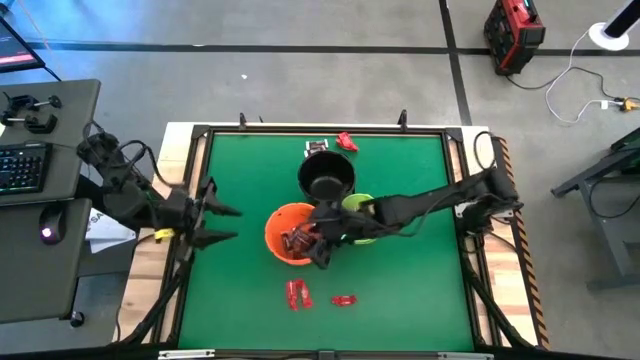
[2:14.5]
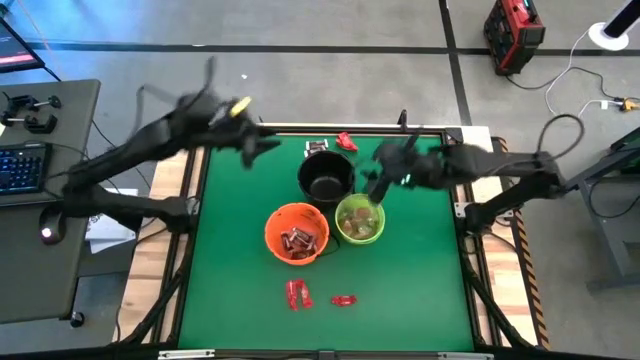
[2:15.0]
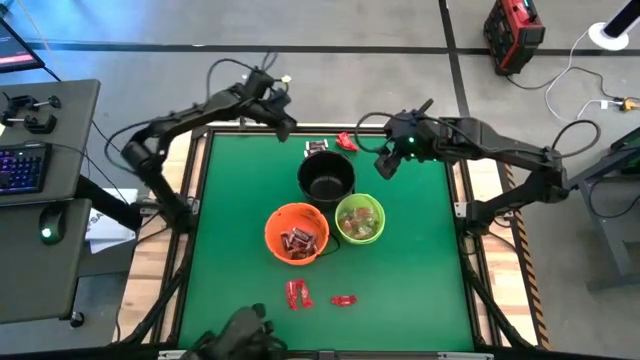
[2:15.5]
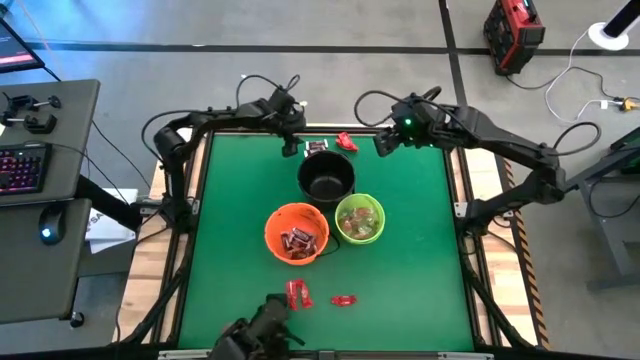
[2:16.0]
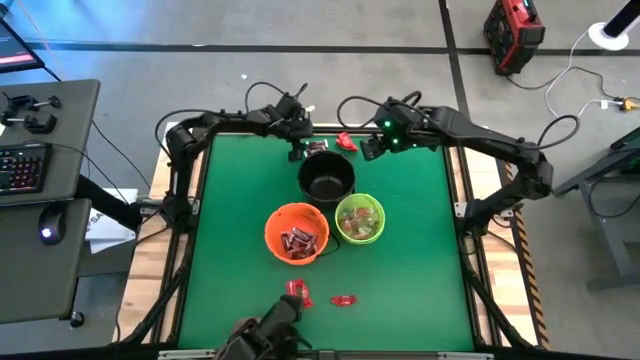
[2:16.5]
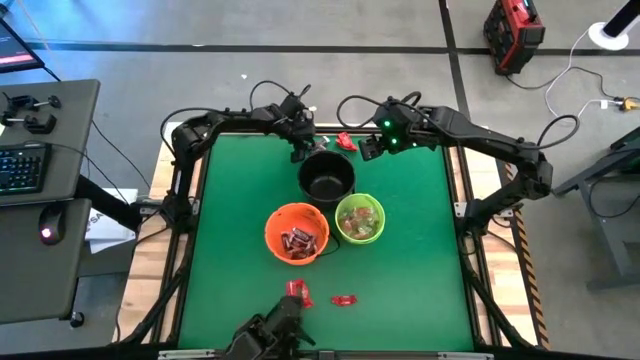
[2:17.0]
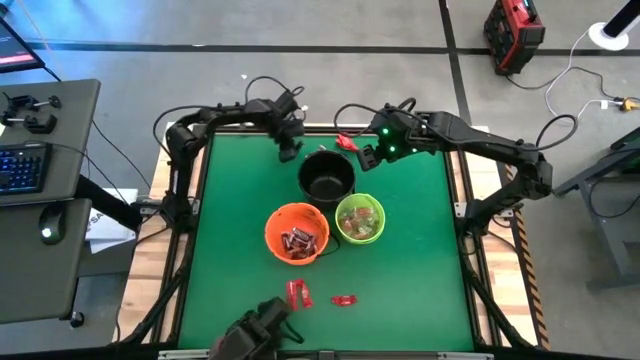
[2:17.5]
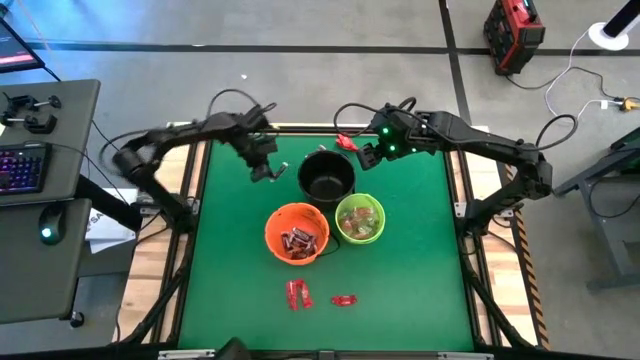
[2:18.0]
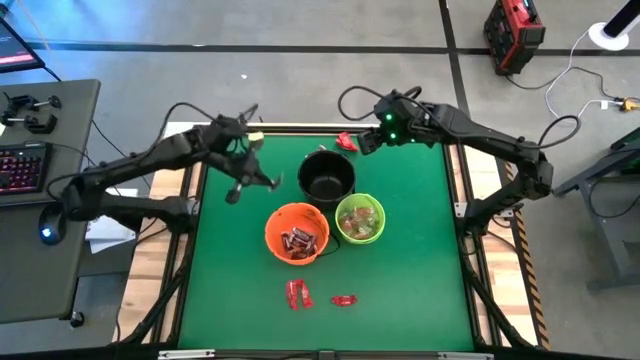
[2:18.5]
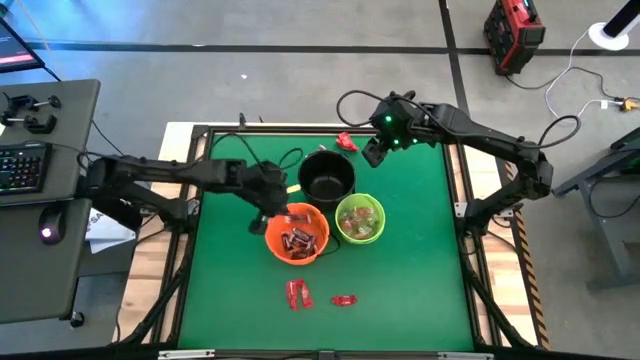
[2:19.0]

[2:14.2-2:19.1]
Task: Sort candy by brand, put in halloween buckets
Put the brown chocolate bar into orange bucket

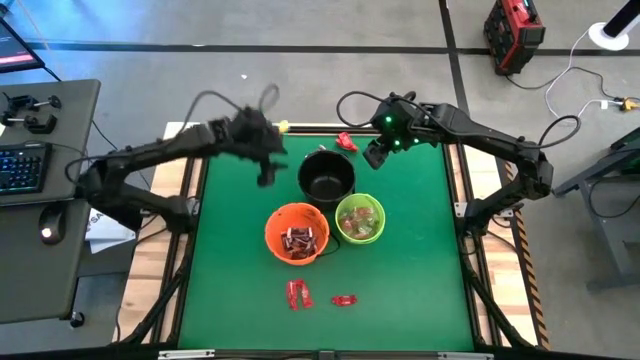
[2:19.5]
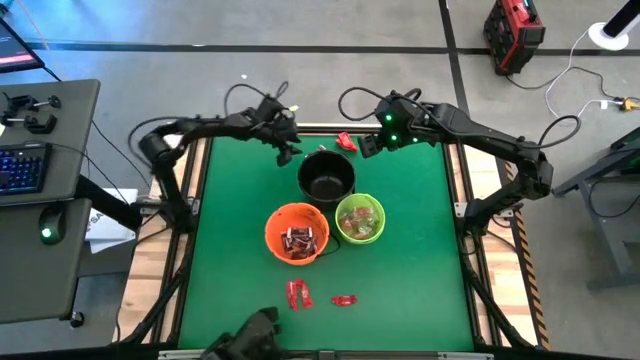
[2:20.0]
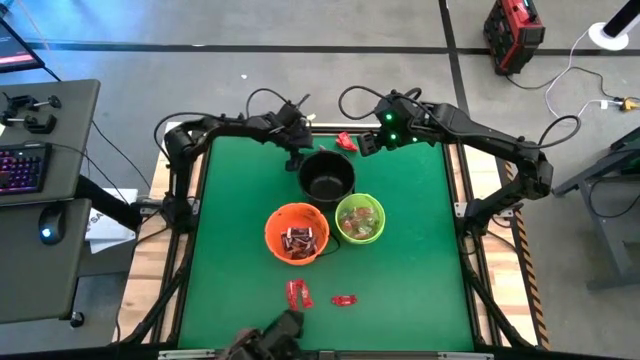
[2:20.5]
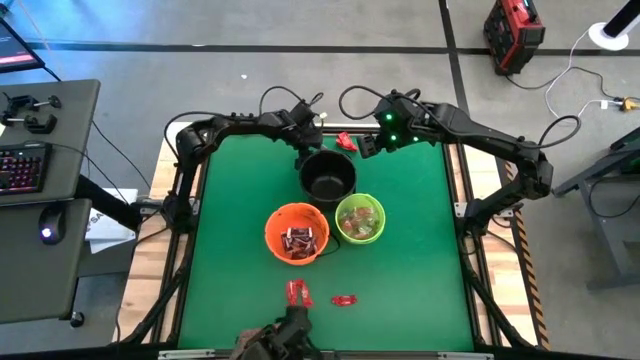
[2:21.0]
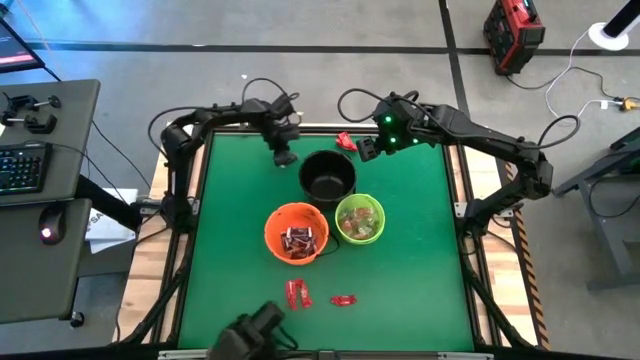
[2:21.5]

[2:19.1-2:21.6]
Put the brown chocolate bar into orange bucket

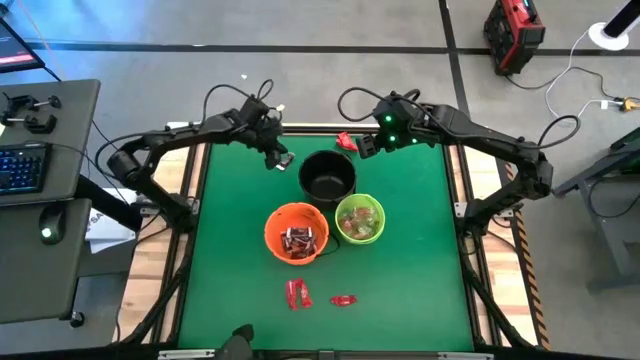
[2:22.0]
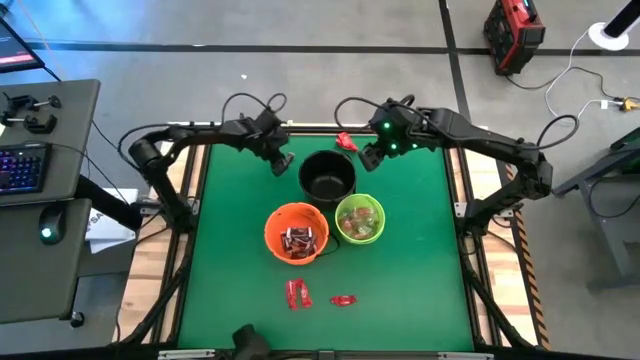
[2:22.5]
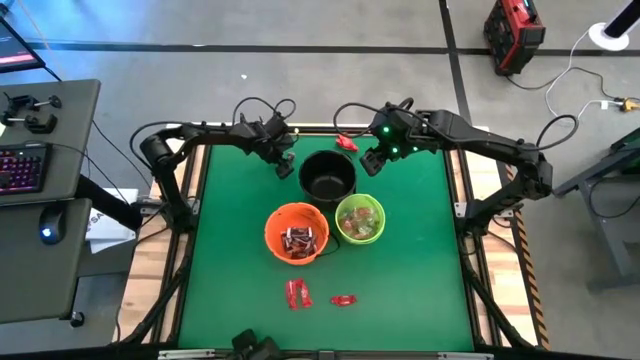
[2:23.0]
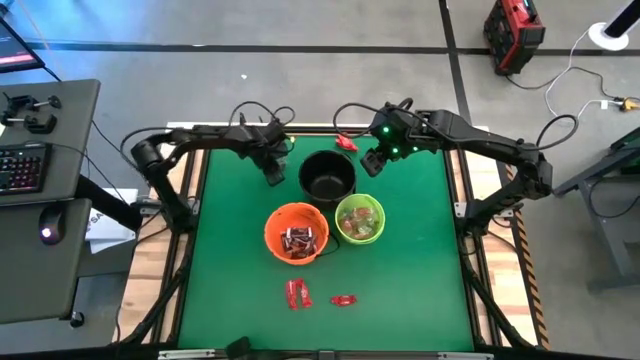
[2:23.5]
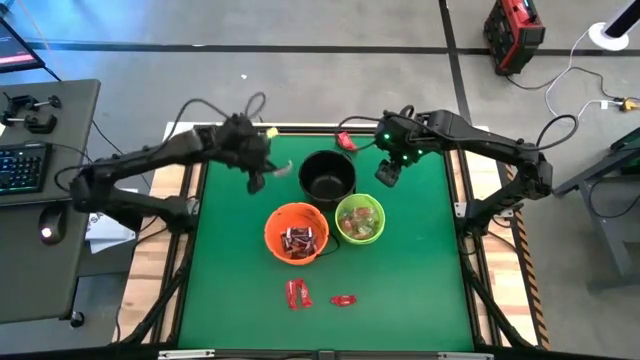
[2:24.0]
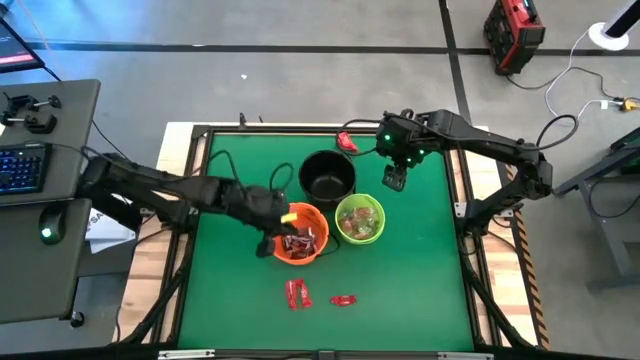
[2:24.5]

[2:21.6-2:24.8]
Put the brown chocolate bar into orange bucket

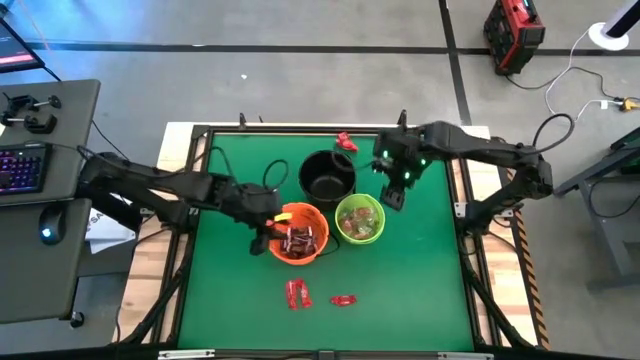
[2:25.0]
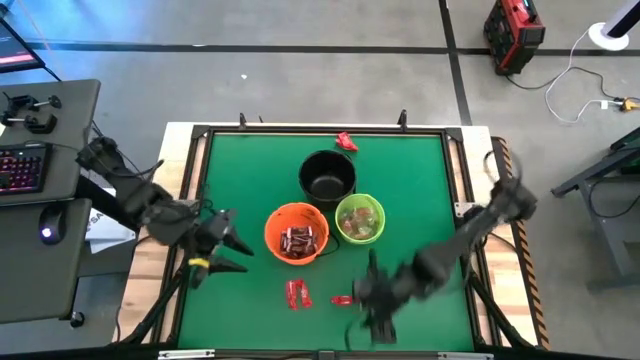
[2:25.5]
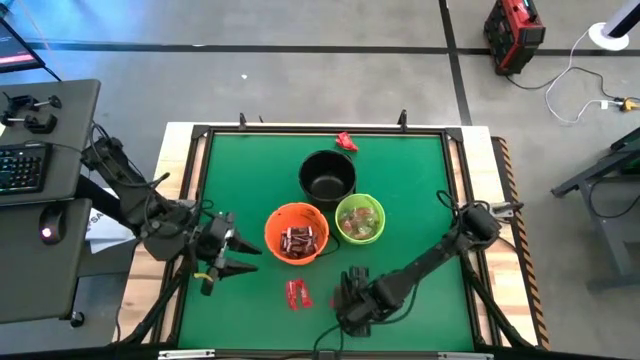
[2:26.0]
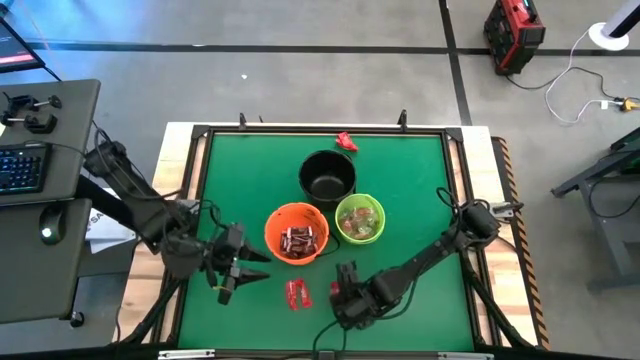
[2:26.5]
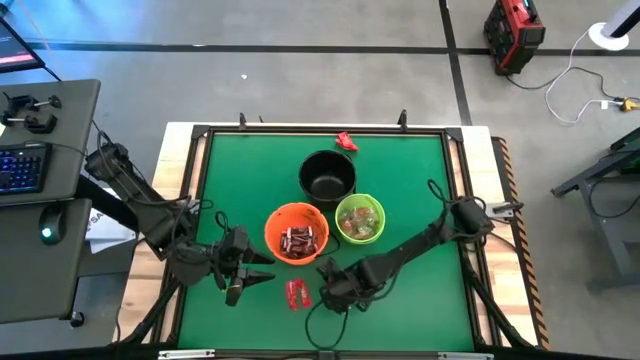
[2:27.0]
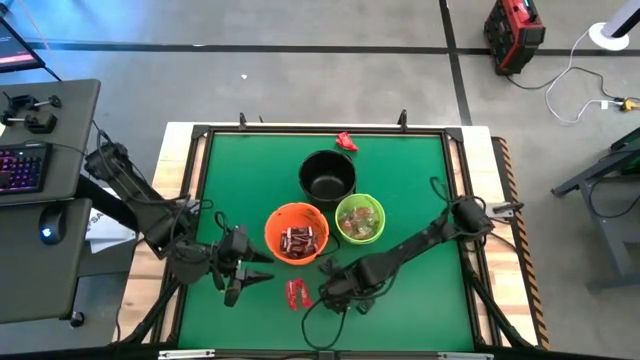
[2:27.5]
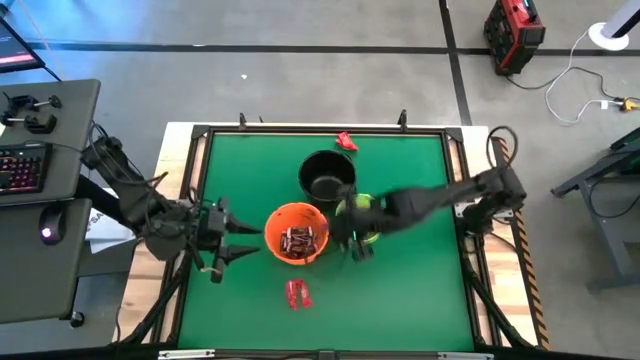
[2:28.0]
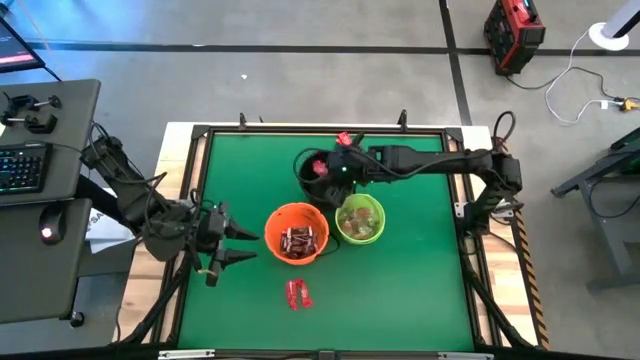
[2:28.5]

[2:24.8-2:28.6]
Put the red chocolate bar into black bucket

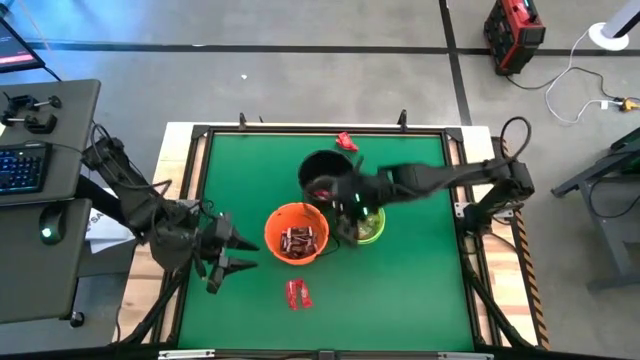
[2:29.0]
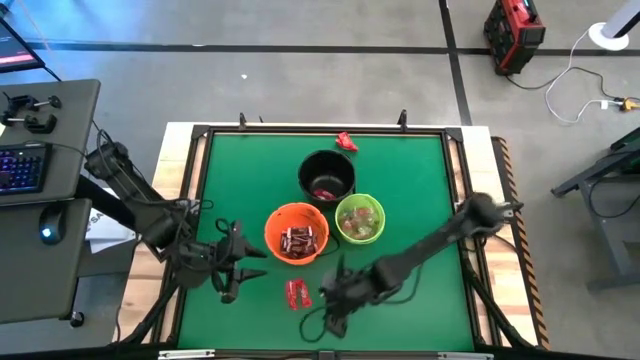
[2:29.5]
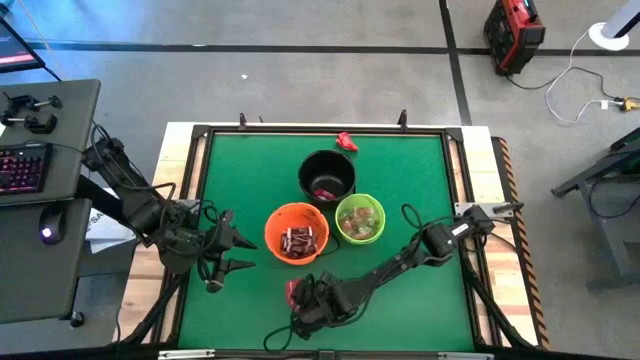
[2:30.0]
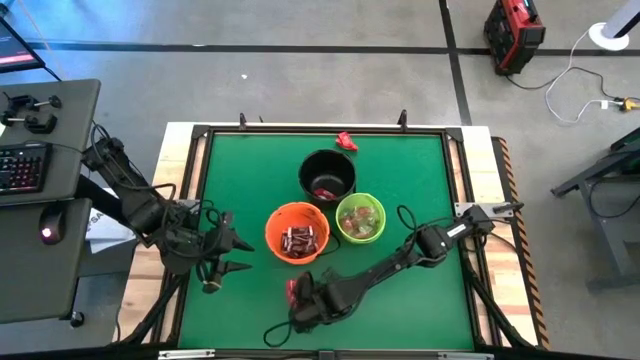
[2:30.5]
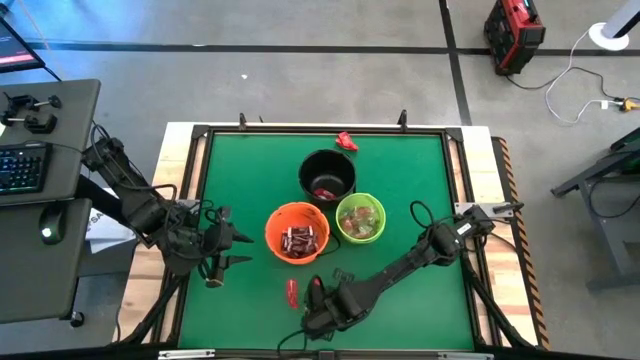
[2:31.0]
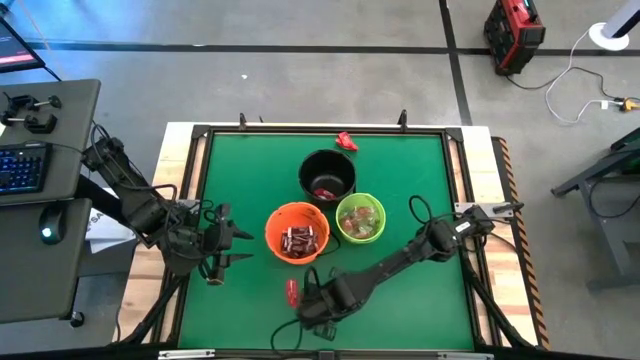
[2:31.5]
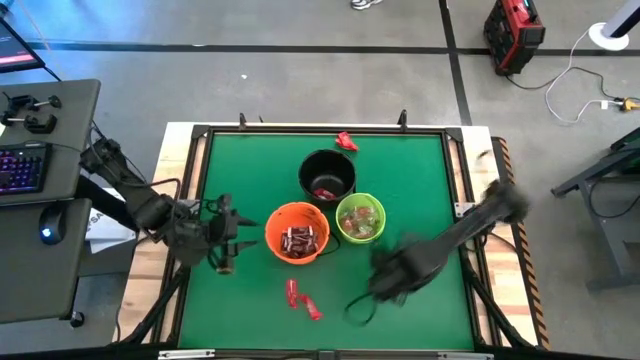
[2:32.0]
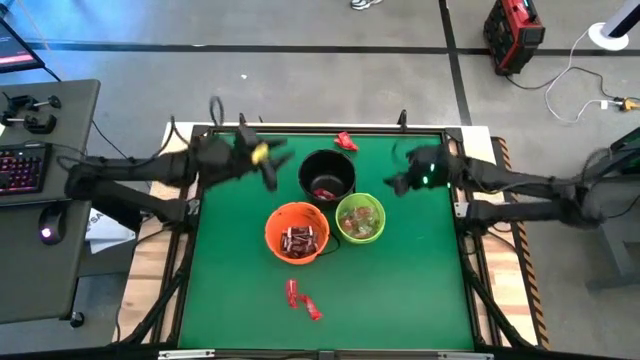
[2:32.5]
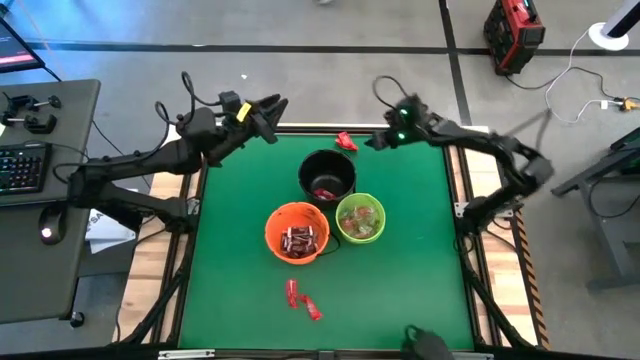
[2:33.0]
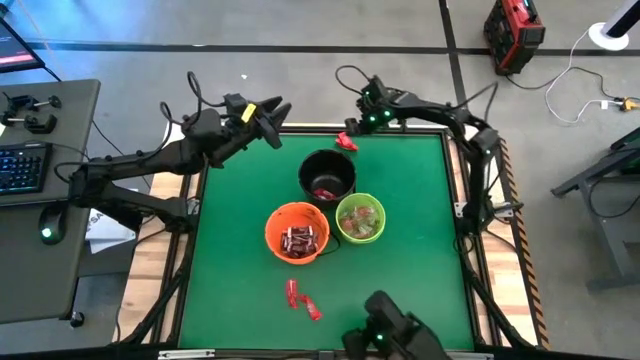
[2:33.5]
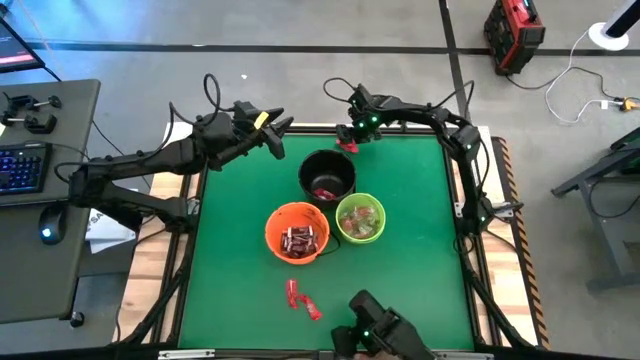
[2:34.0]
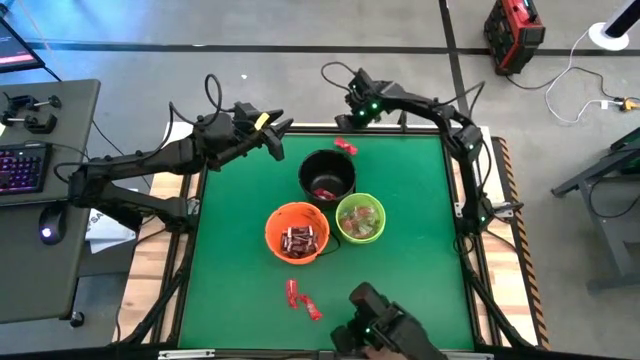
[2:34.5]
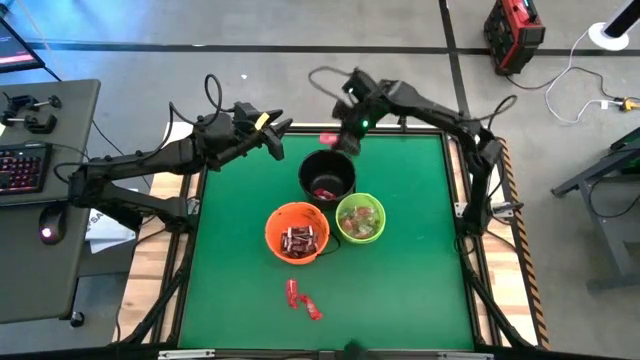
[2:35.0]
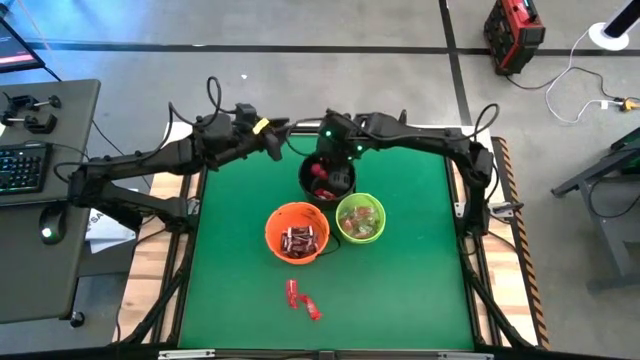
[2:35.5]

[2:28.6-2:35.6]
Put the red chocolate bar into black bucket
